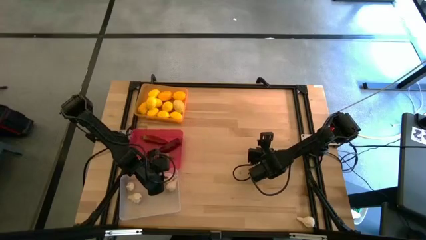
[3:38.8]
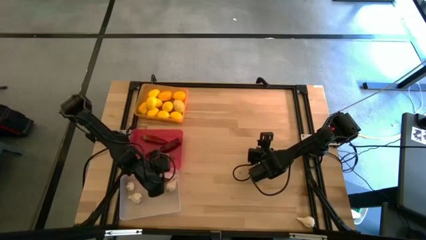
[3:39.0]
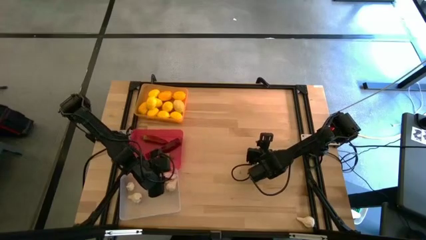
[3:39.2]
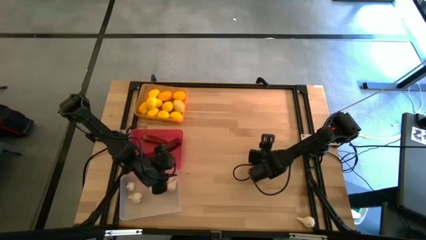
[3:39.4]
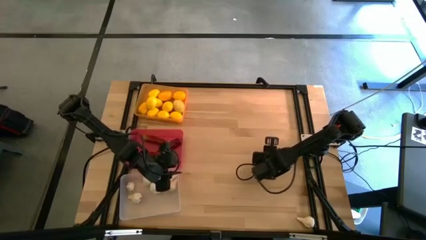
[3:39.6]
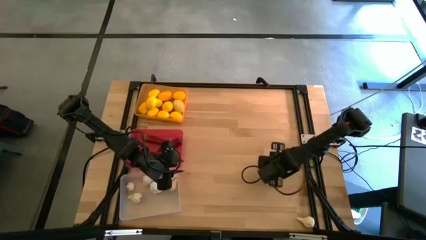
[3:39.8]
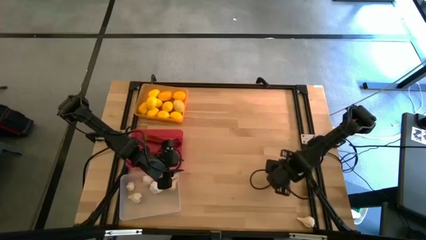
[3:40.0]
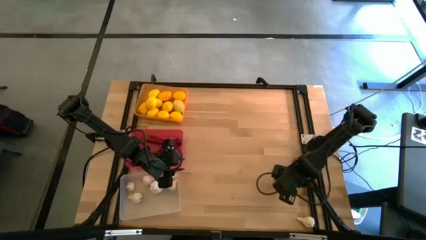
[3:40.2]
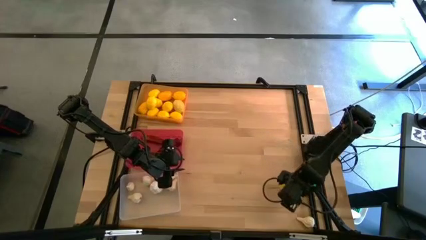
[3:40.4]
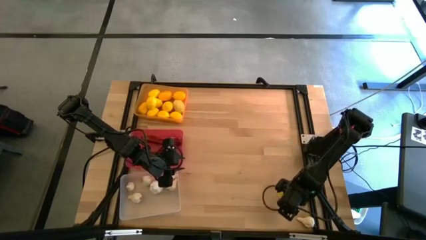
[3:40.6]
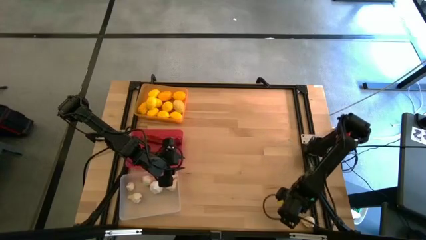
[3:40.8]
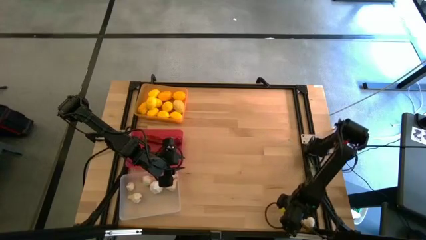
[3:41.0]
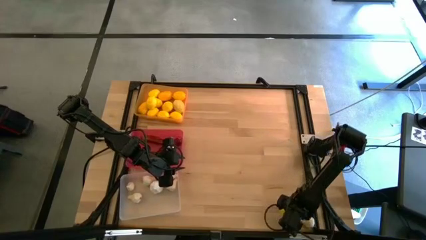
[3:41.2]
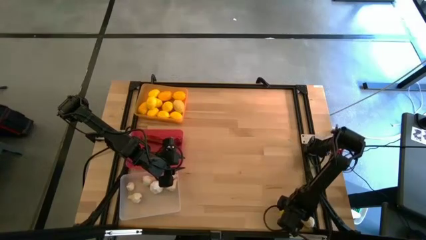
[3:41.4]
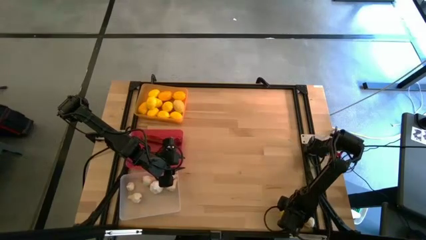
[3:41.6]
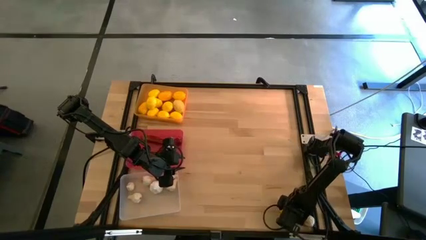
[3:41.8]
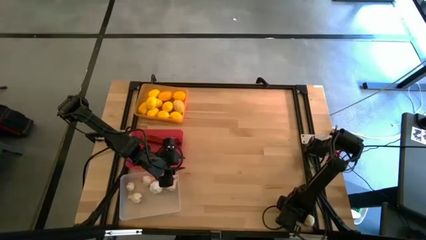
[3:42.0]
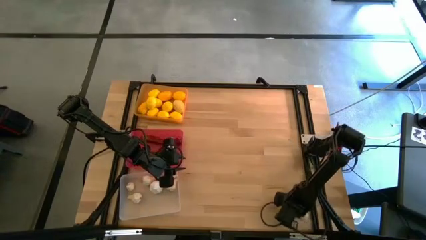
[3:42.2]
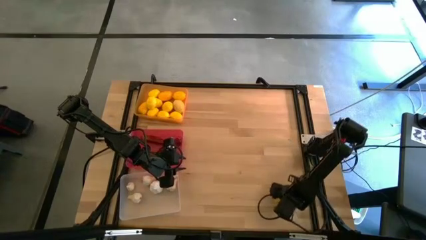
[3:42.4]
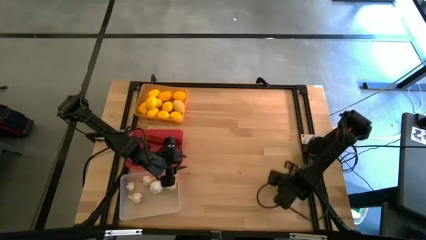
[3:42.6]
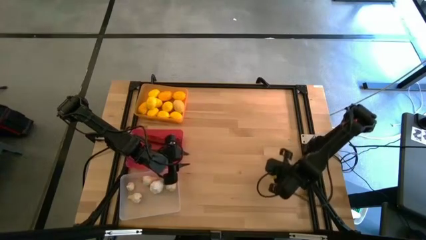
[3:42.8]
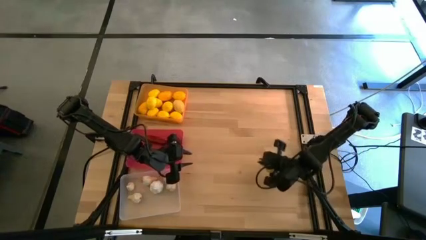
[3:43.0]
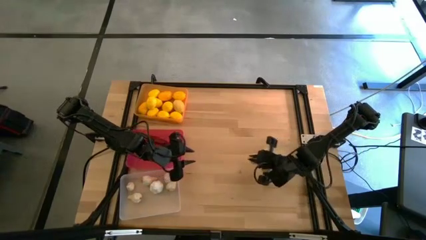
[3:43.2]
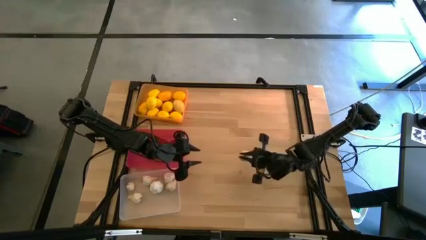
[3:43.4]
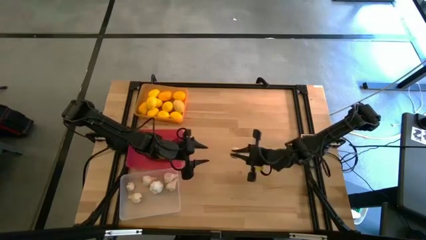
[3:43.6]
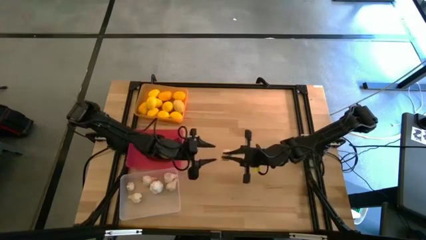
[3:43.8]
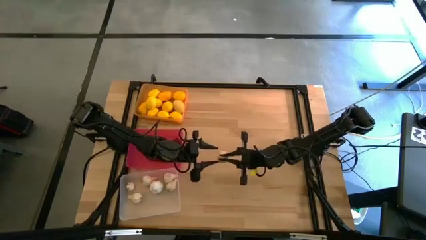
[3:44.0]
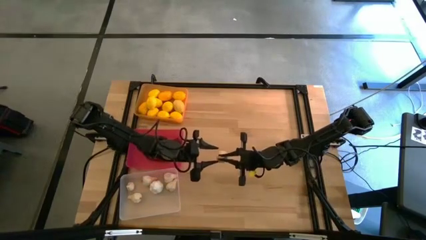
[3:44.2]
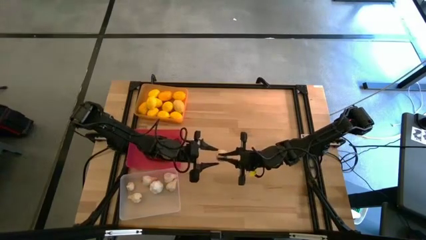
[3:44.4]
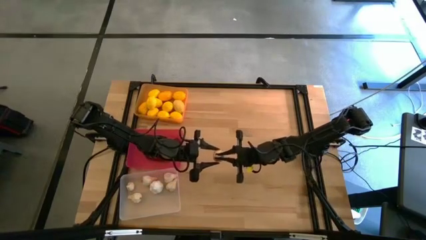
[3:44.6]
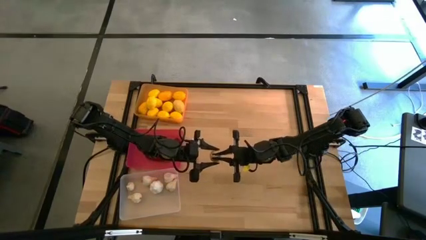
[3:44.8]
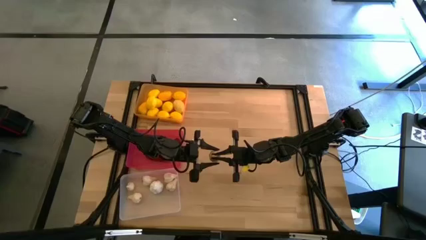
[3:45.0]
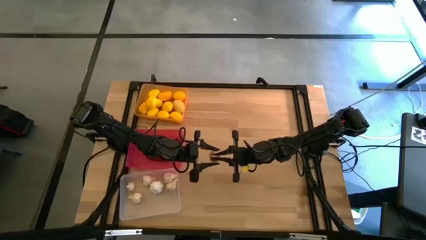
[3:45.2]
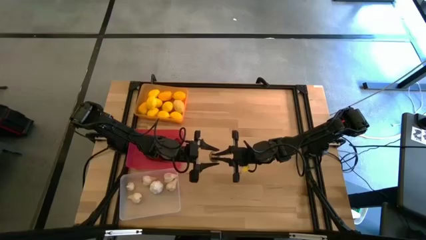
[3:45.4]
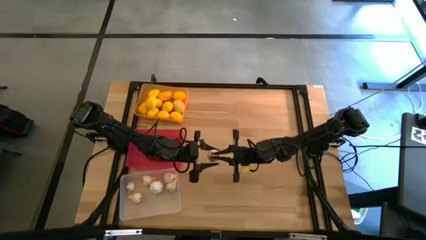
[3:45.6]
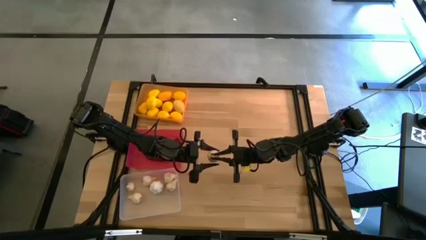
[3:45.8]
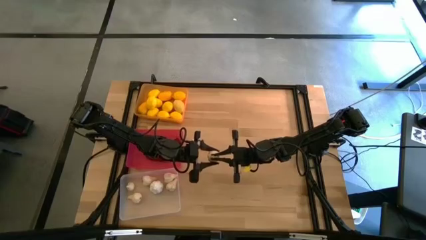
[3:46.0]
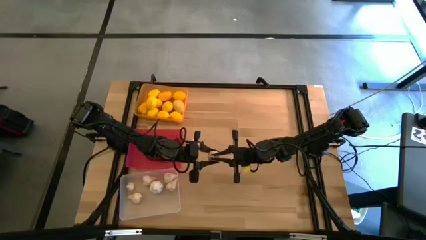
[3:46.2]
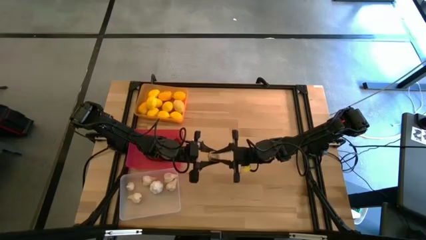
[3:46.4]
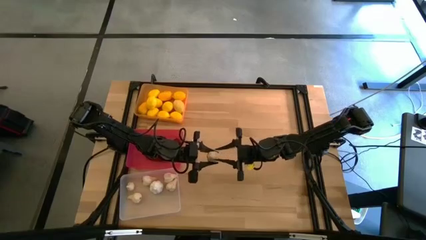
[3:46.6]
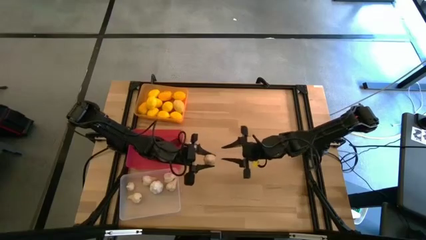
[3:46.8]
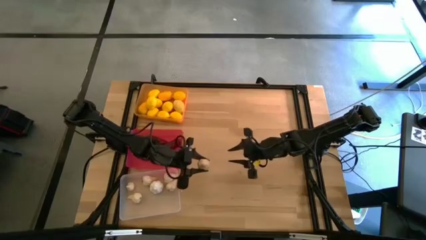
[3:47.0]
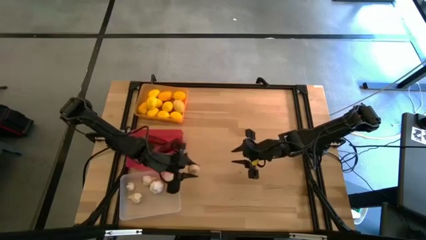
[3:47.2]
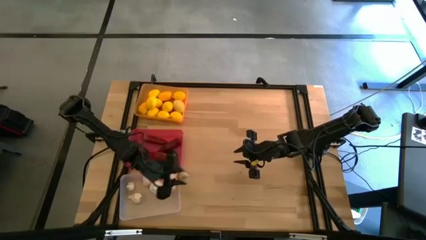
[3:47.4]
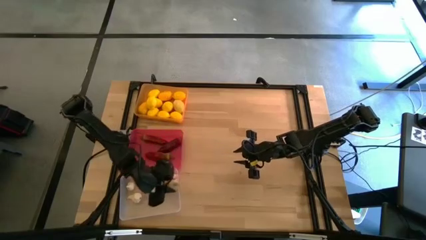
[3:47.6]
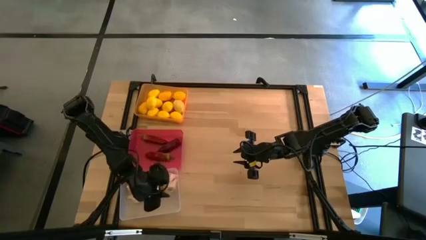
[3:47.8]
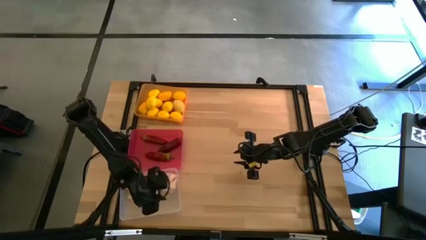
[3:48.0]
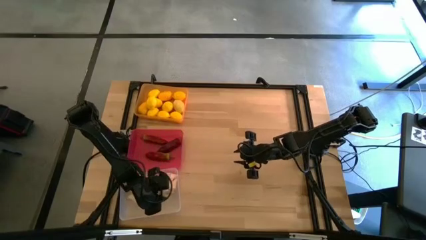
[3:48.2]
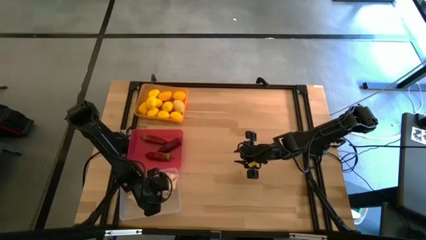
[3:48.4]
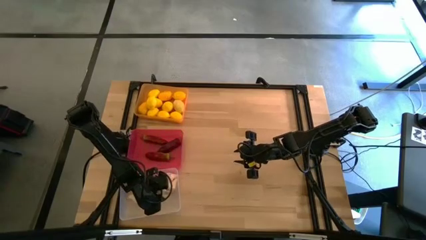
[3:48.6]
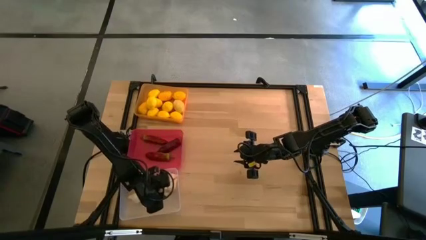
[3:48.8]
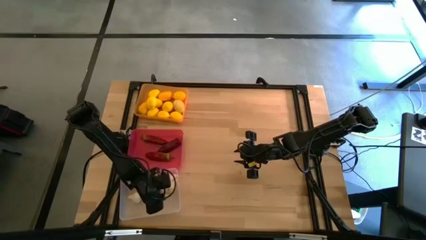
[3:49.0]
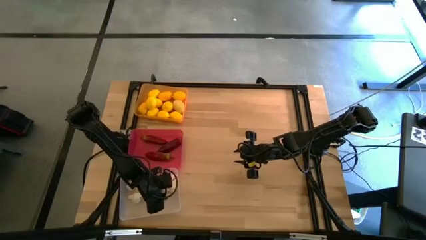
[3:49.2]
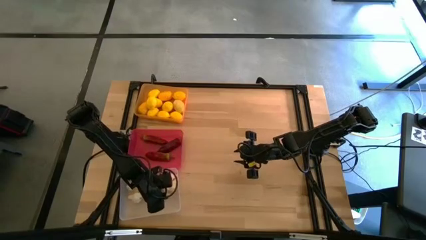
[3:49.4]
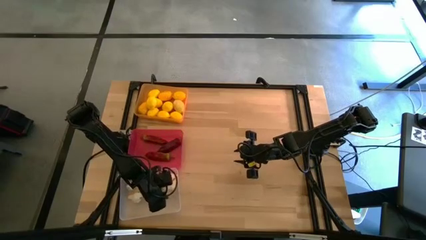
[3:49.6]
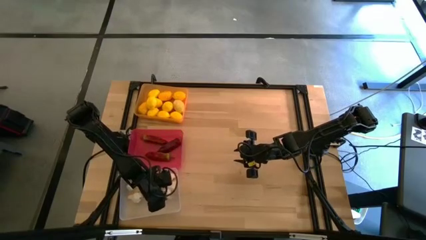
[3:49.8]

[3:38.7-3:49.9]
Task: Sort produce into baskets
Put the garlic into the transparent bin

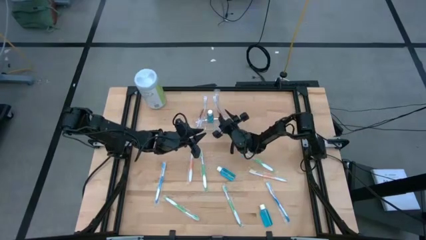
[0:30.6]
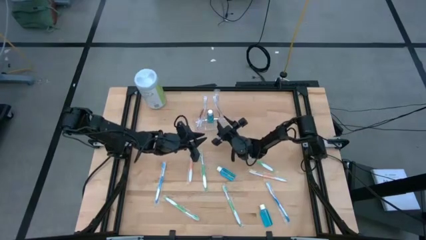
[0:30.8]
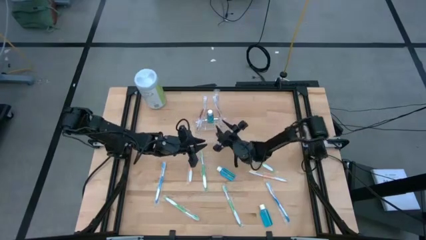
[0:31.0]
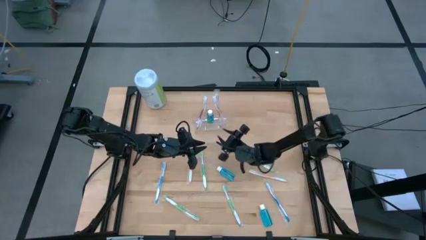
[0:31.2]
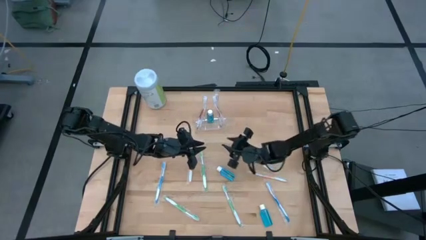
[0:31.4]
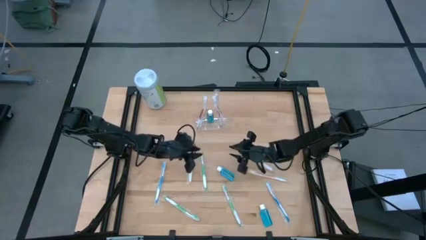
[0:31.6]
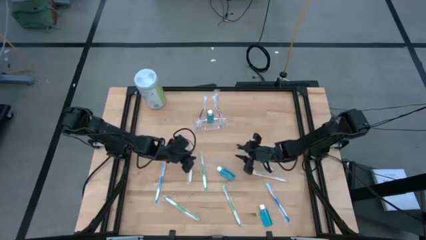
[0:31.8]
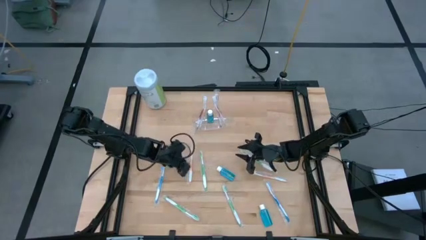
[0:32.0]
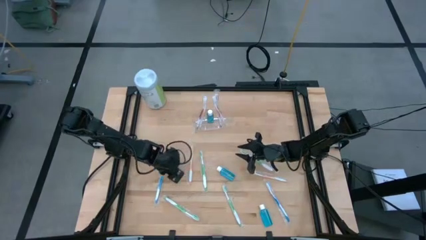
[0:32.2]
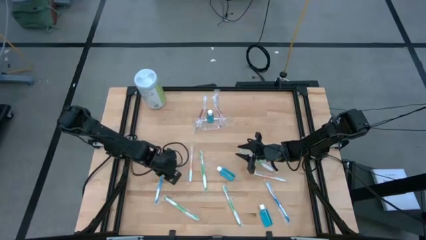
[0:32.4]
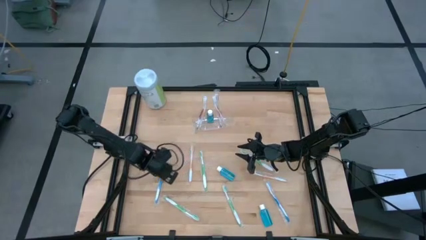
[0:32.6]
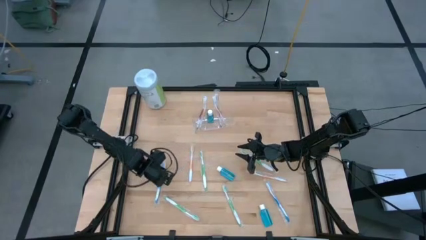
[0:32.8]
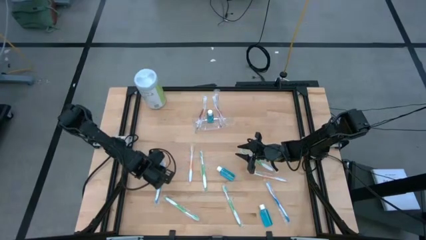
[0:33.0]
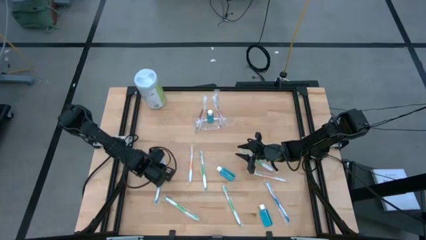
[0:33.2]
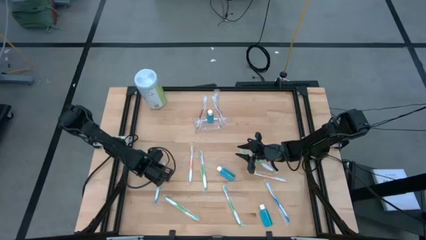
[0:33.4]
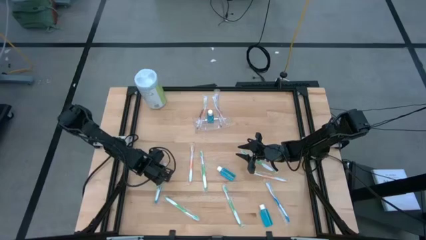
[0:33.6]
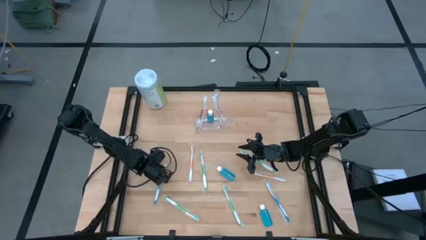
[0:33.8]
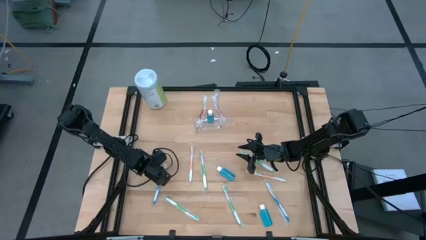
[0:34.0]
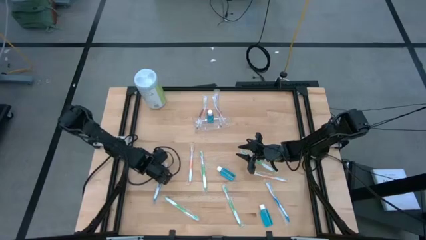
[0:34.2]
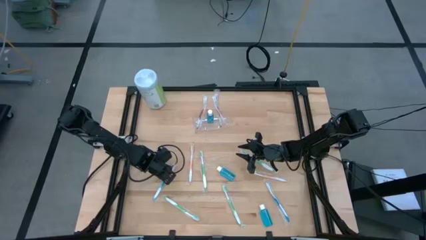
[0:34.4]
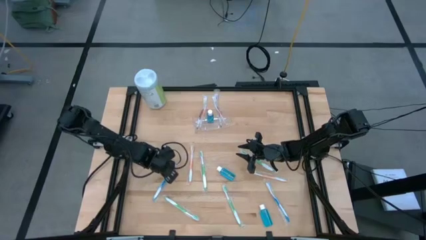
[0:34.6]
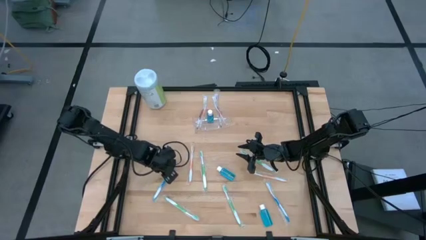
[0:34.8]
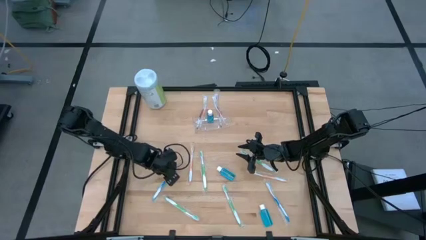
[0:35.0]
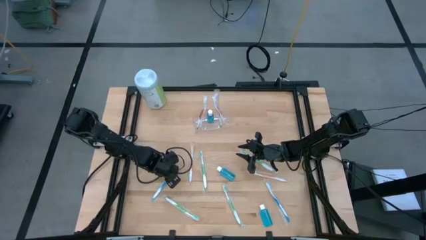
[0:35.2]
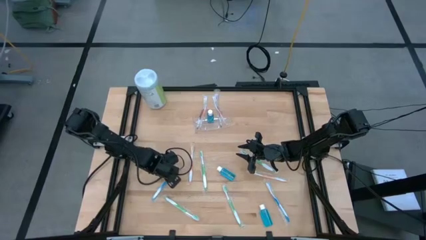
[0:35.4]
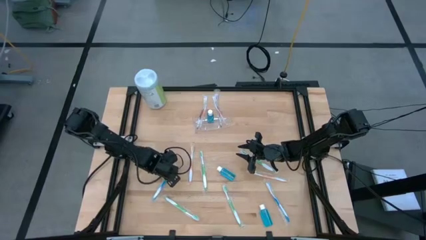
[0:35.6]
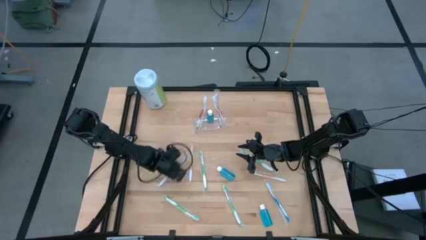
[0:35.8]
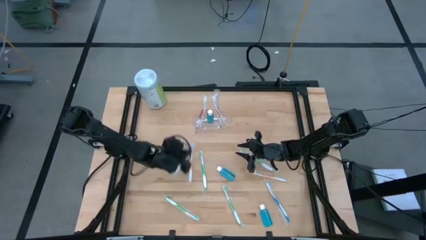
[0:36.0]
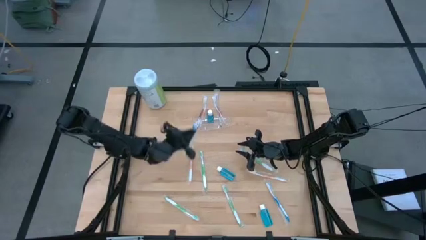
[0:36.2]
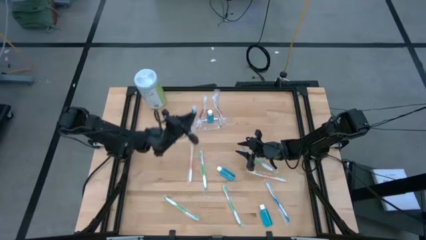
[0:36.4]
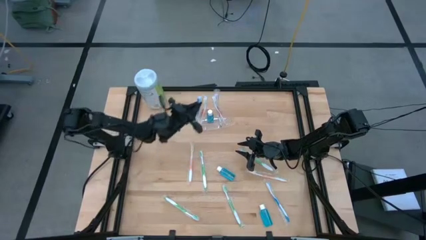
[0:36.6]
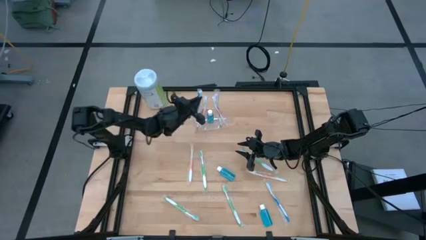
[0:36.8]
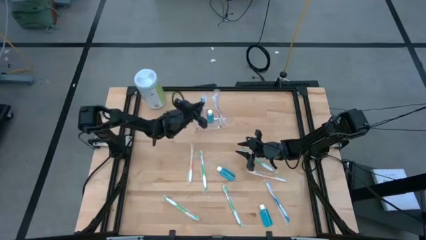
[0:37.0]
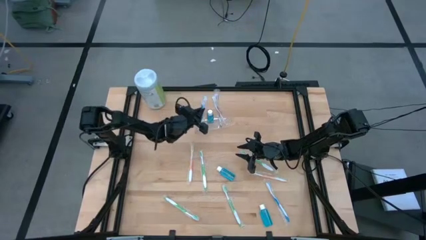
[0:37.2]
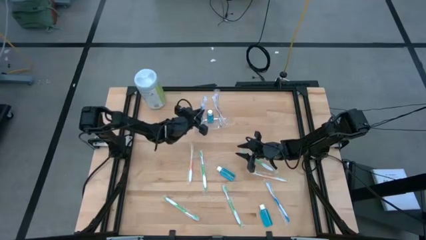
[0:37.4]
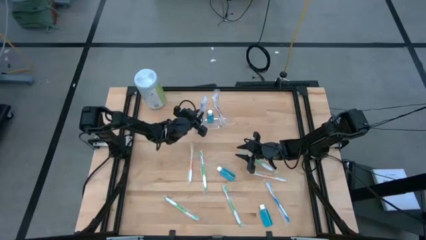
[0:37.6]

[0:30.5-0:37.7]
Task: Pick & Place toothbrushing station
Put the blue toothbrush to the left of the transparent organizer
